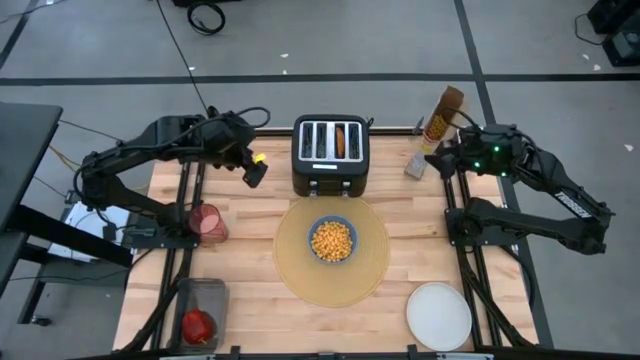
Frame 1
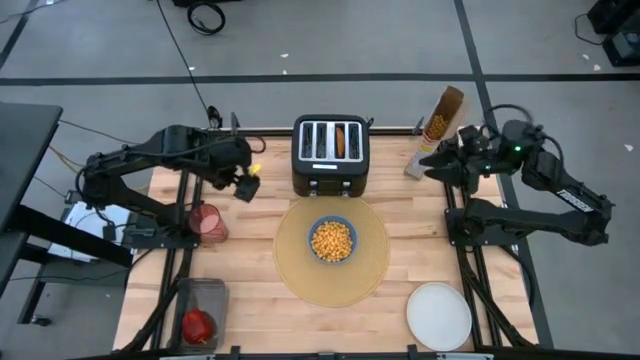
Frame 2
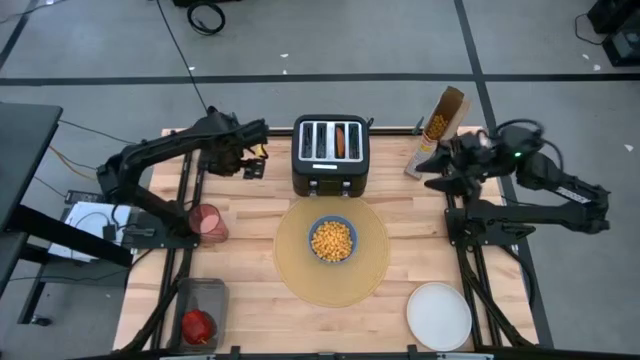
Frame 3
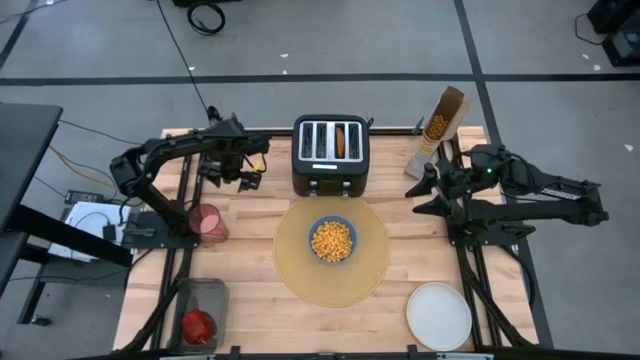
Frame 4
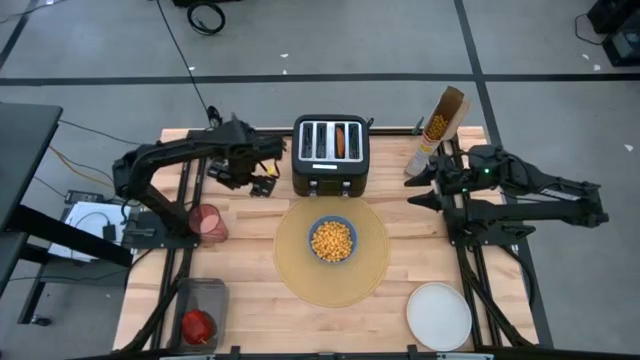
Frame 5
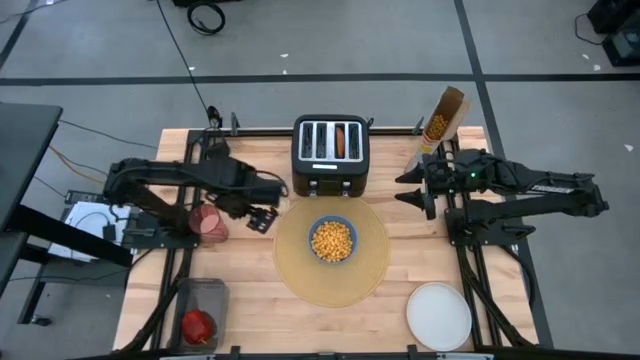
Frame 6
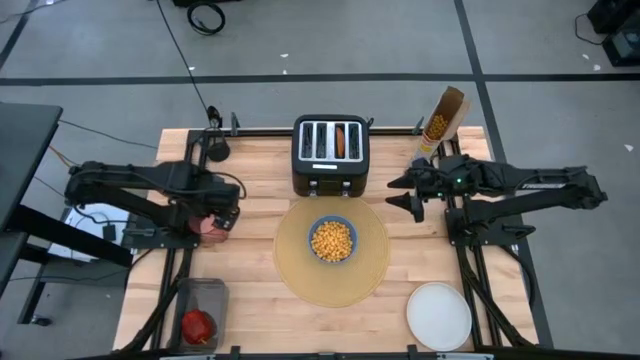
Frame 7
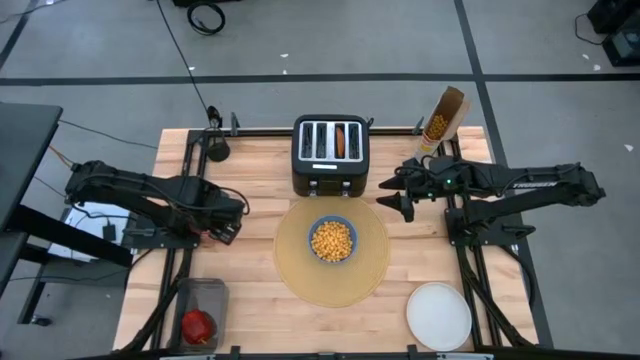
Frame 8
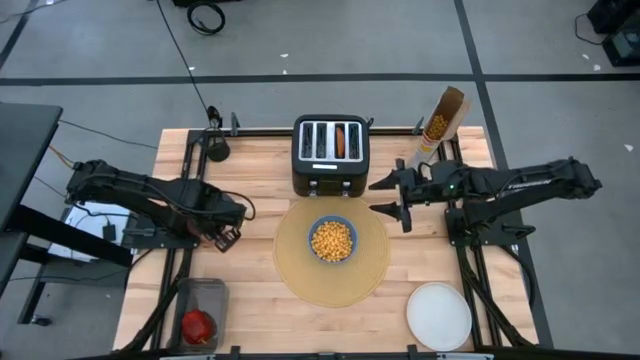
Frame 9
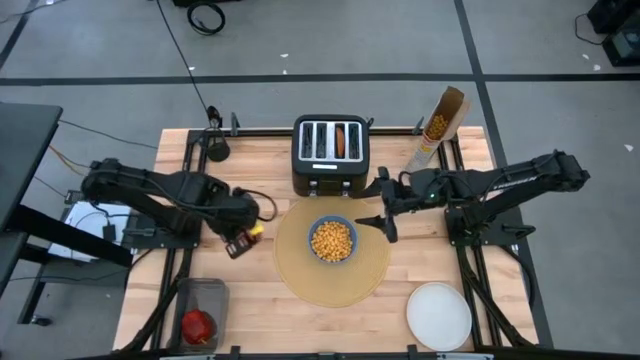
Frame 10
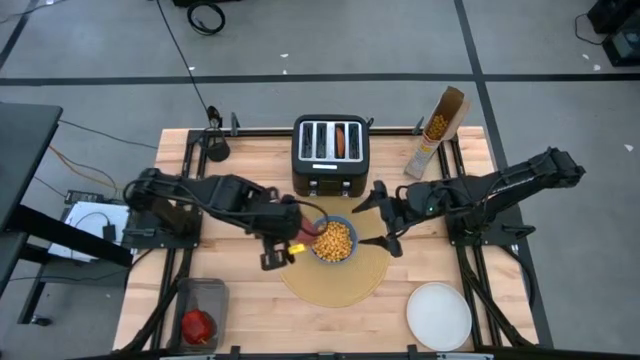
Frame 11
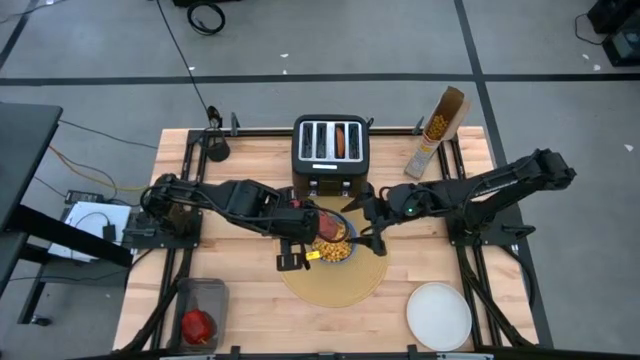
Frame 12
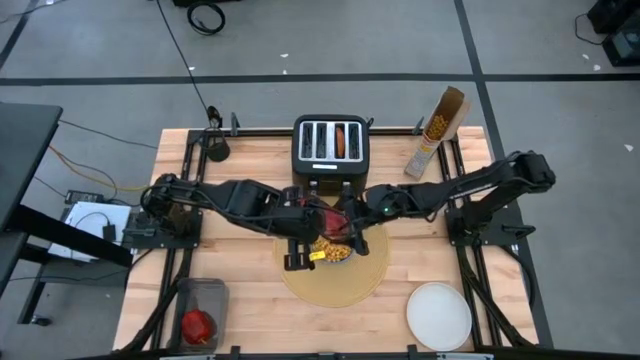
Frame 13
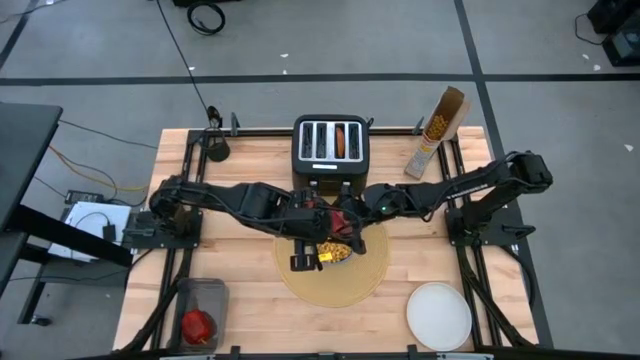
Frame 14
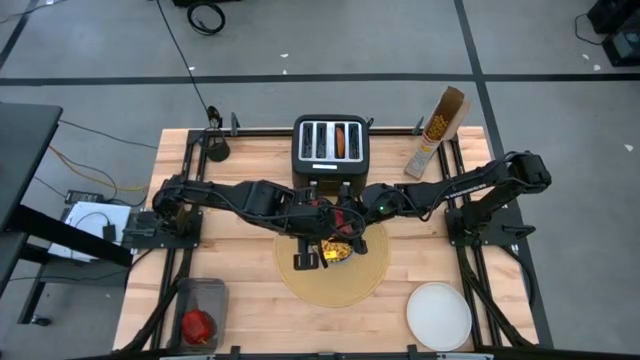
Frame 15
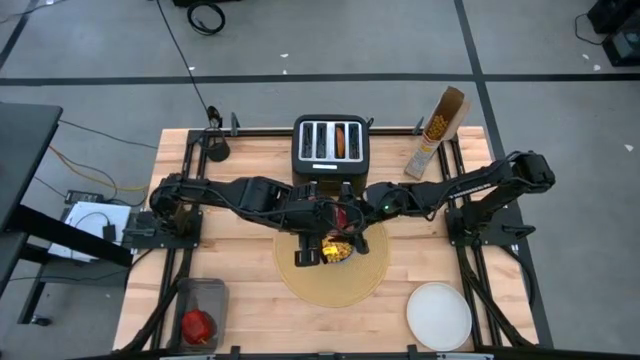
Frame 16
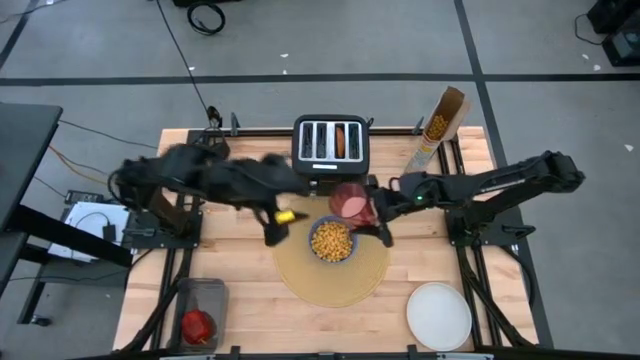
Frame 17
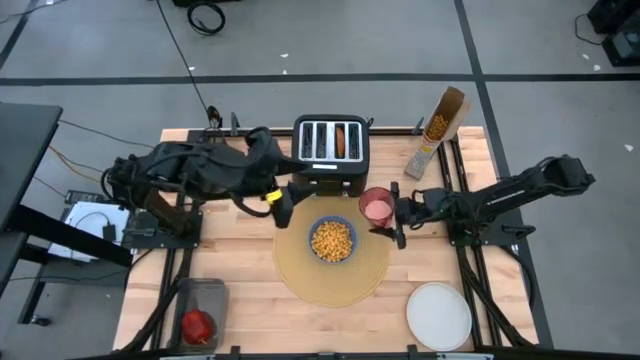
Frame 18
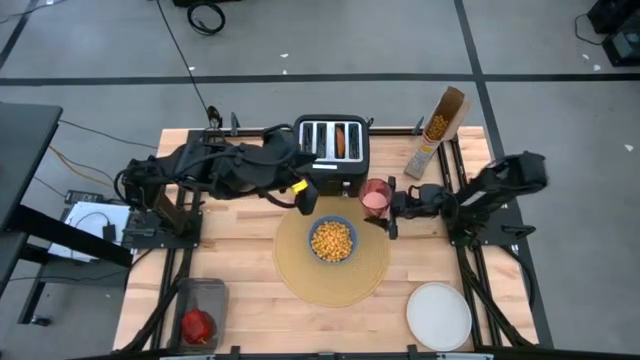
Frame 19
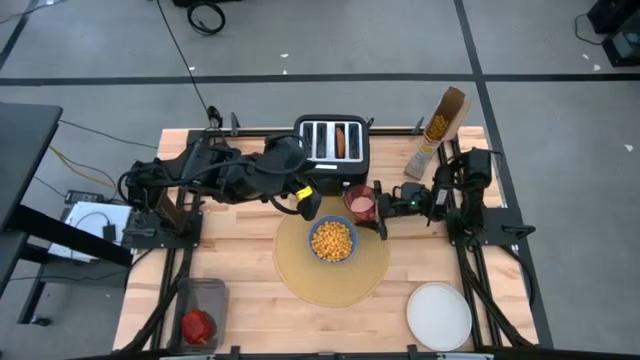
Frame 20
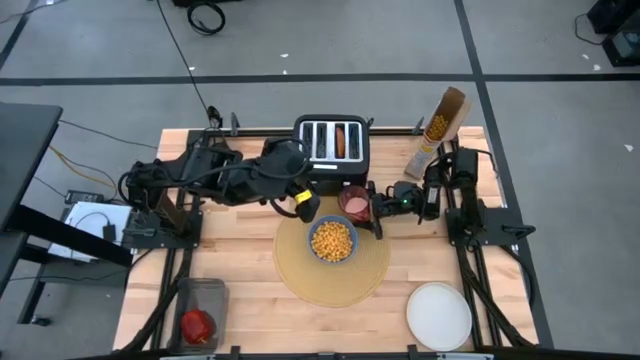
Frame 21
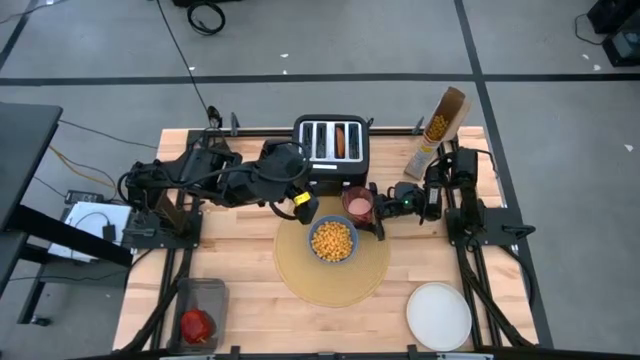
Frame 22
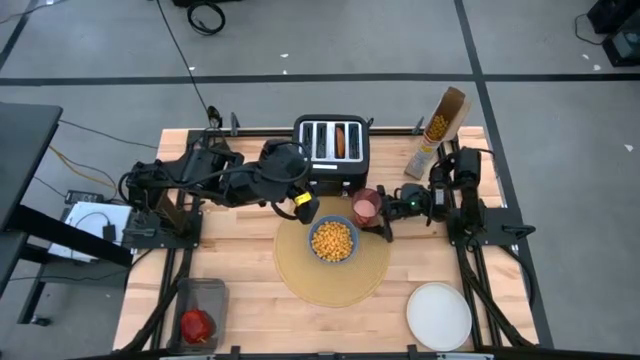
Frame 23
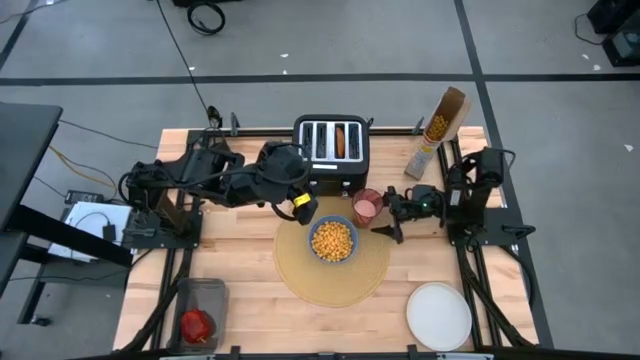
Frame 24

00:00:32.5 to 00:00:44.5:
Task: Arrange a breakfast setting
Put the pink glass on the yellow tablemat

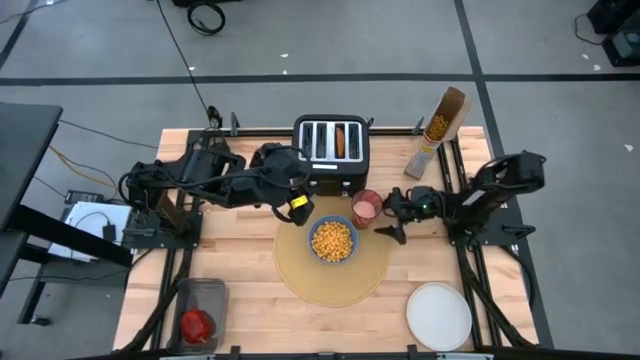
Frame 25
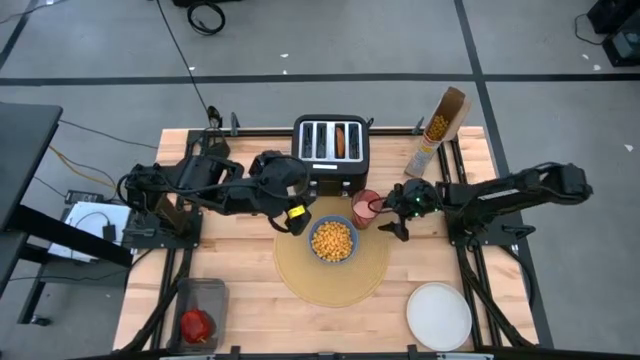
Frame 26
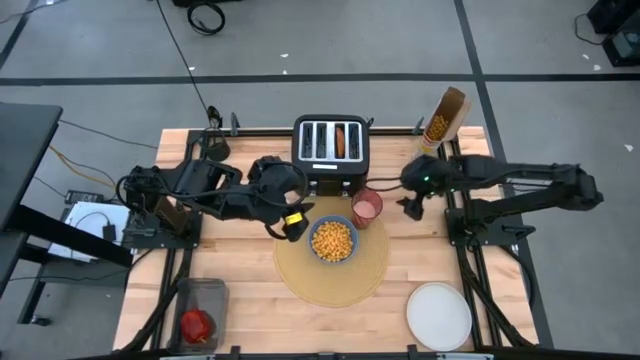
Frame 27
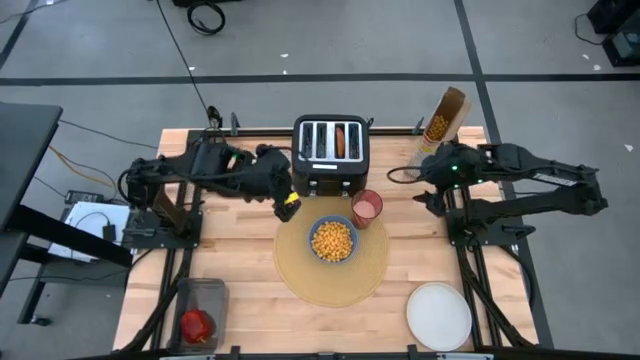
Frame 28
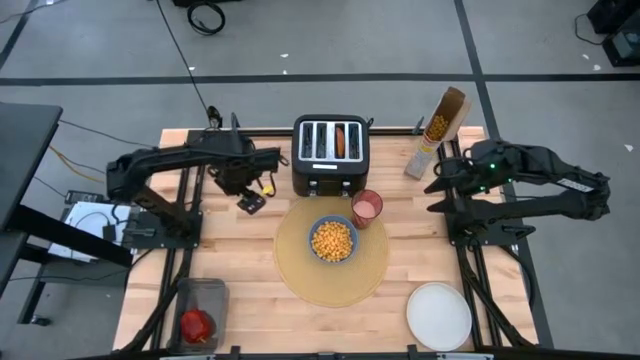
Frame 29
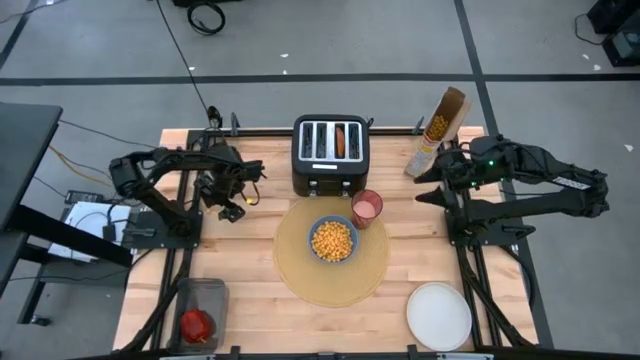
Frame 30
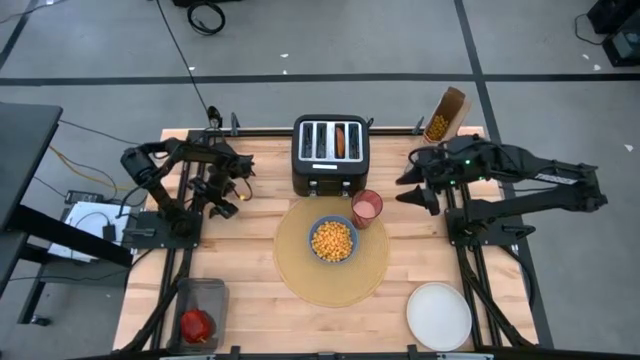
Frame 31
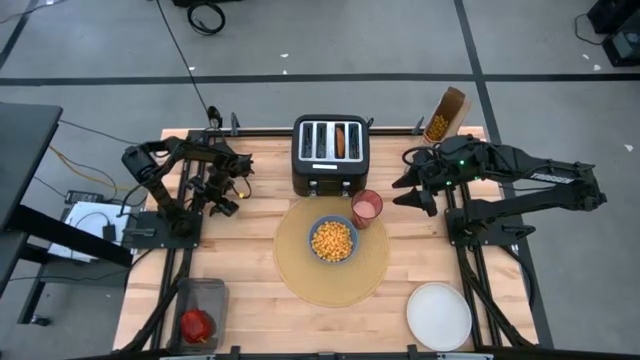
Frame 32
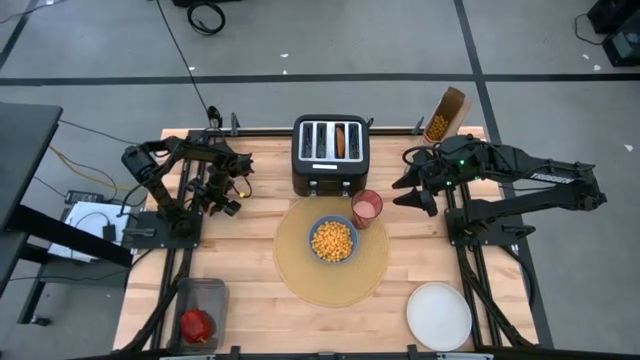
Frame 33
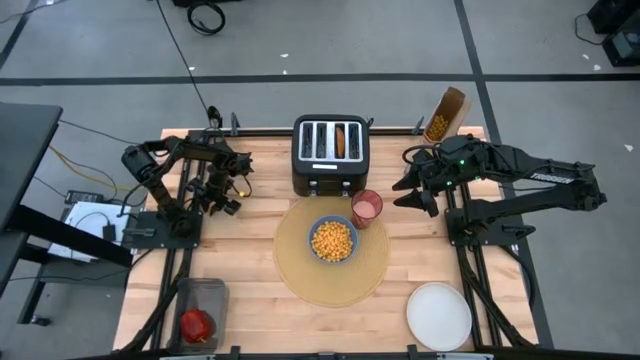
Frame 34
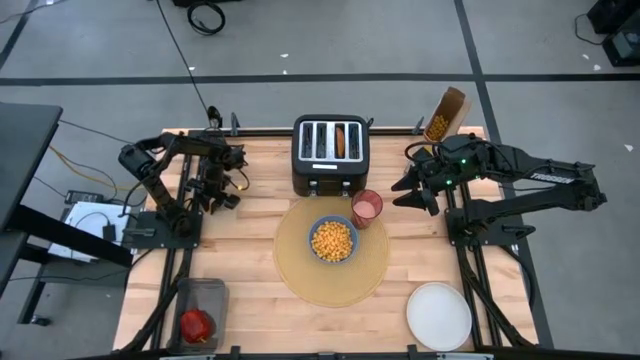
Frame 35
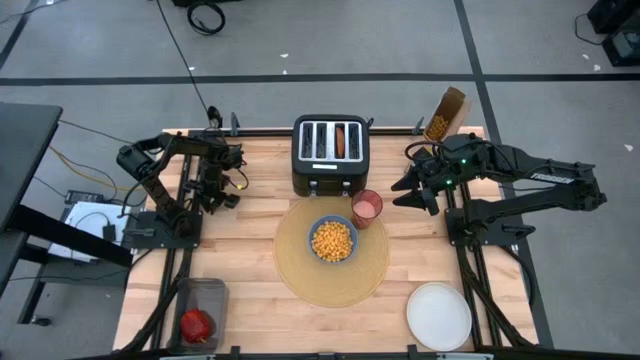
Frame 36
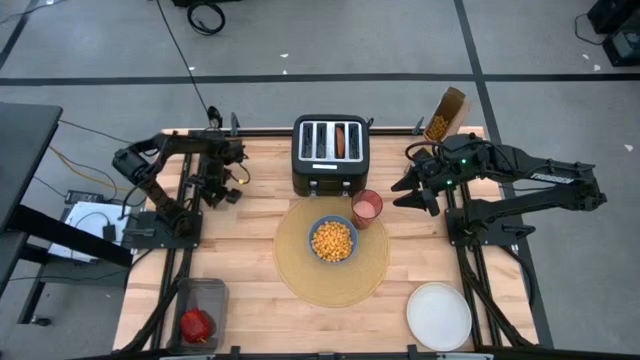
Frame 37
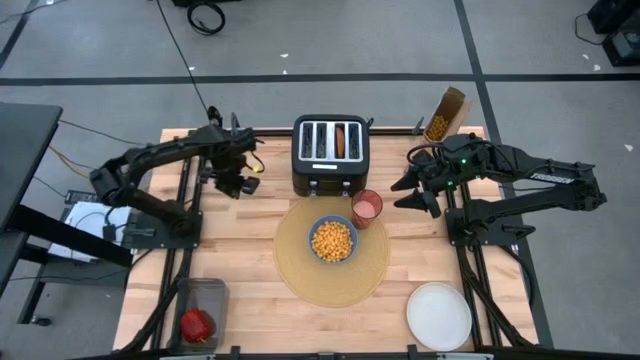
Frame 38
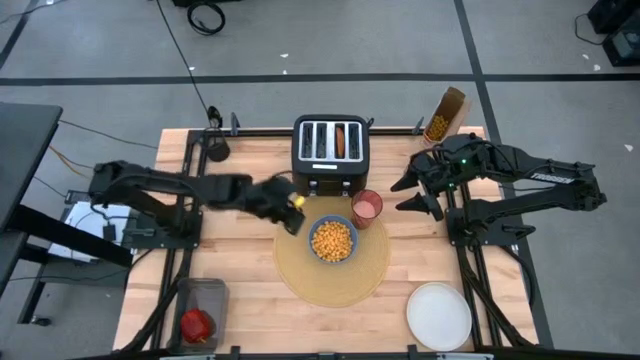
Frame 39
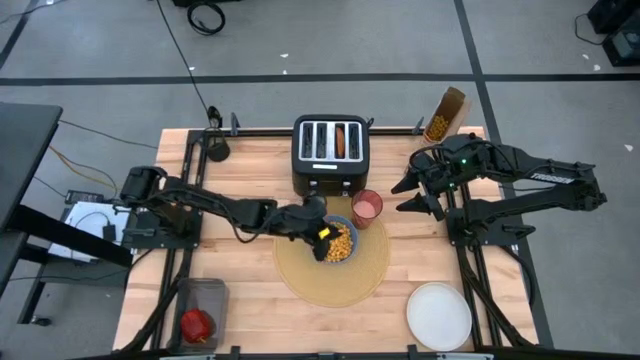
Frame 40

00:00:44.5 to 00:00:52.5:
Put the cereal into the bowl

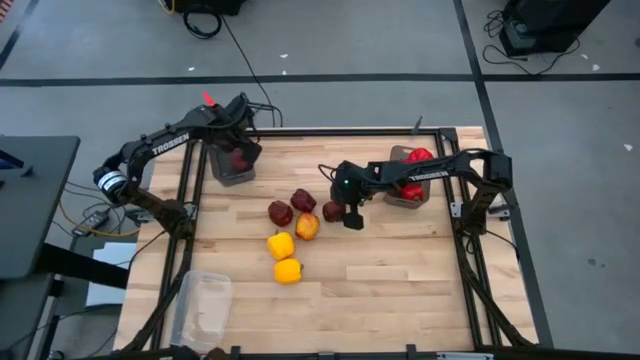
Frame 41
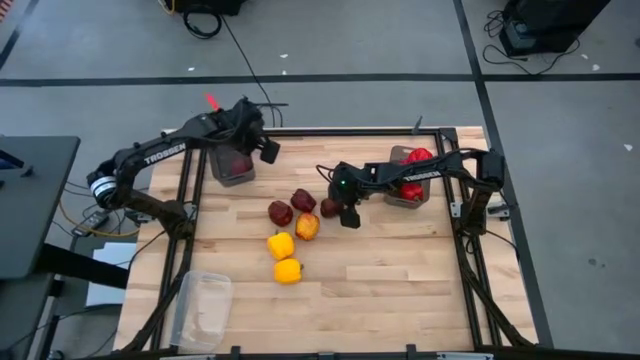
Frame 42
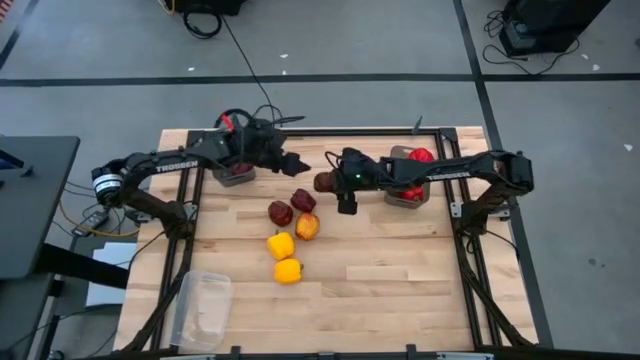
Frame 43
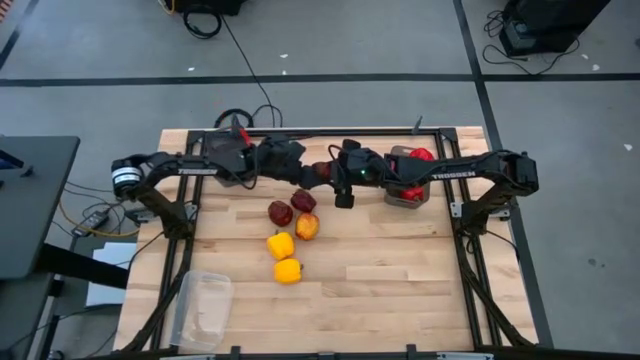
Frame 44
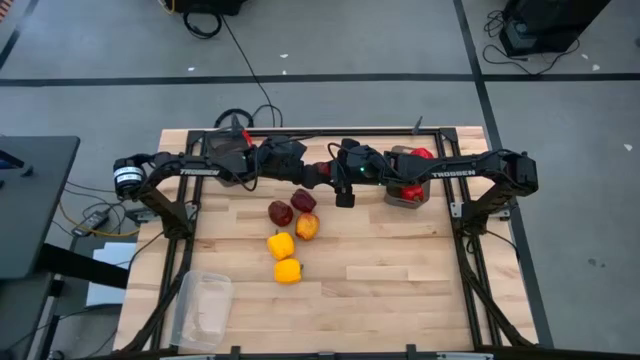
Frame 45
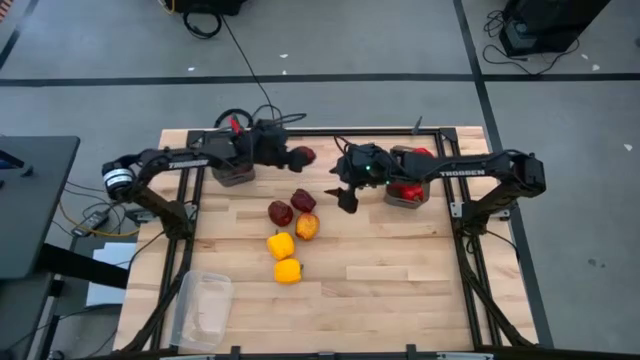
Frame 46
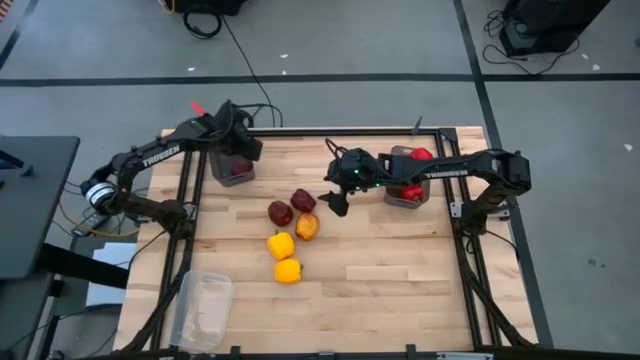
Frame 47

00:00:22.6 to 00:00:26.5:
Task: Sort produce into baskets
Put the red apple into the left black bin
